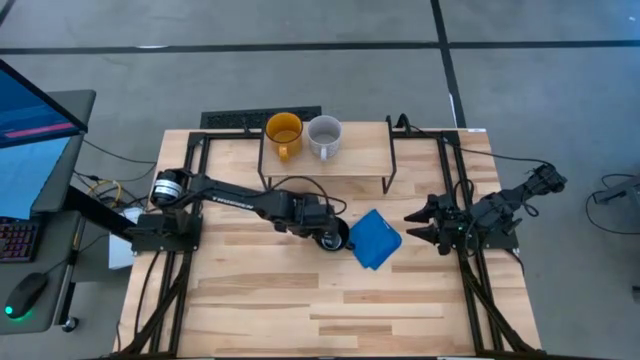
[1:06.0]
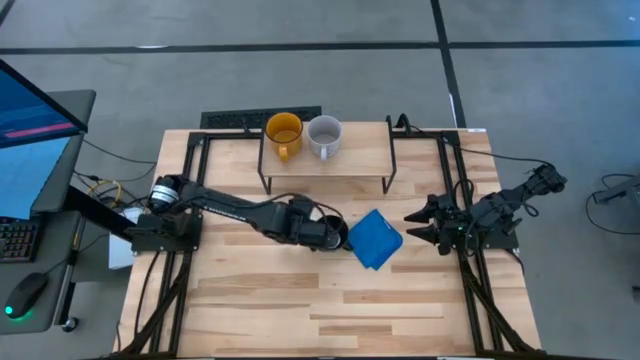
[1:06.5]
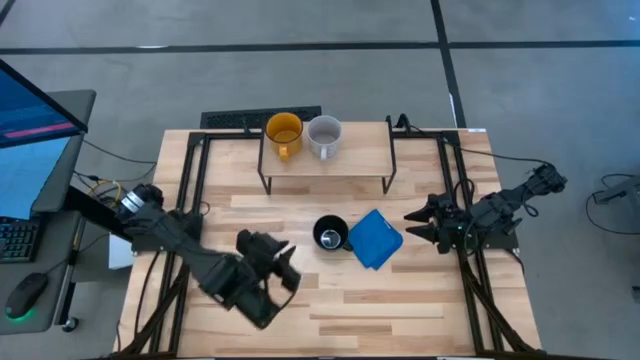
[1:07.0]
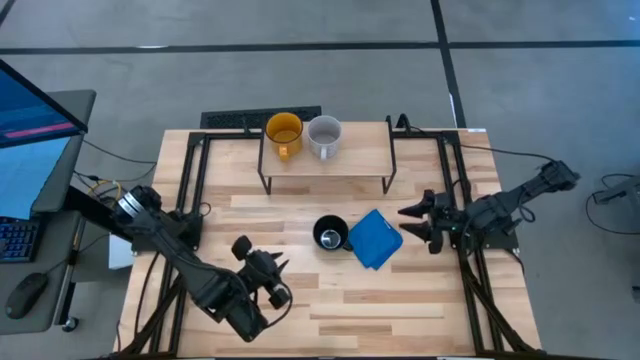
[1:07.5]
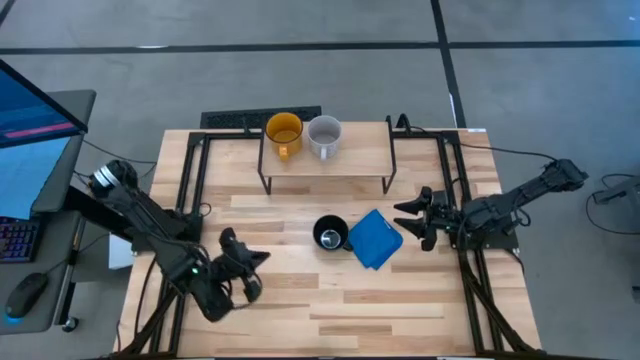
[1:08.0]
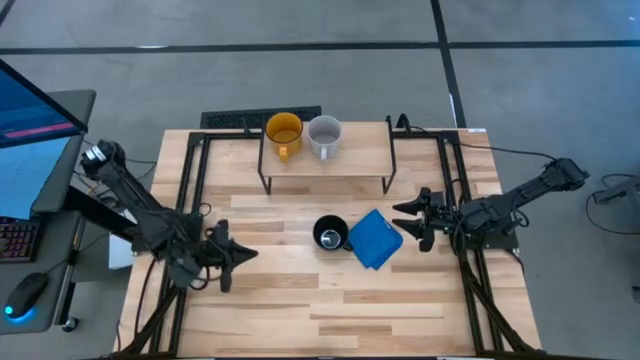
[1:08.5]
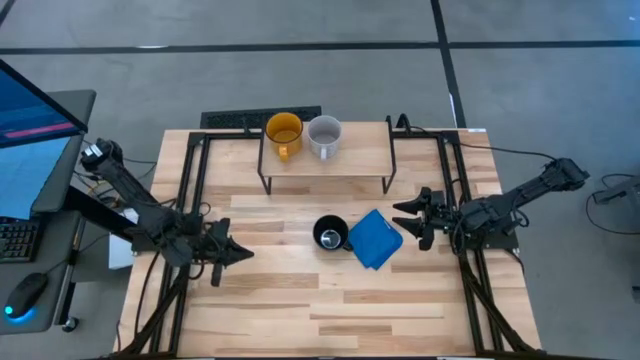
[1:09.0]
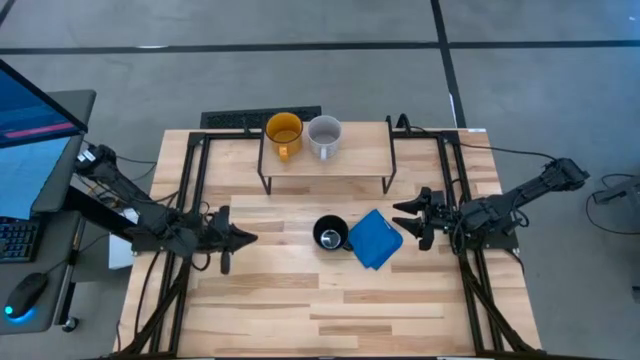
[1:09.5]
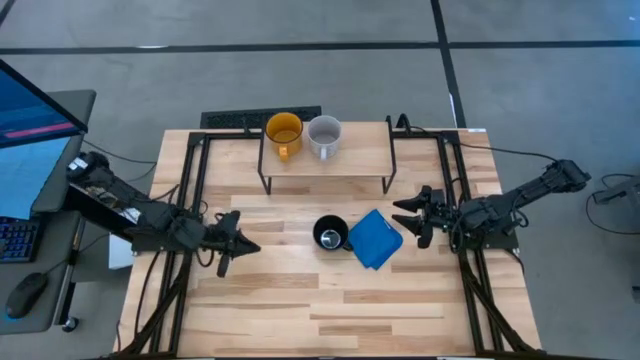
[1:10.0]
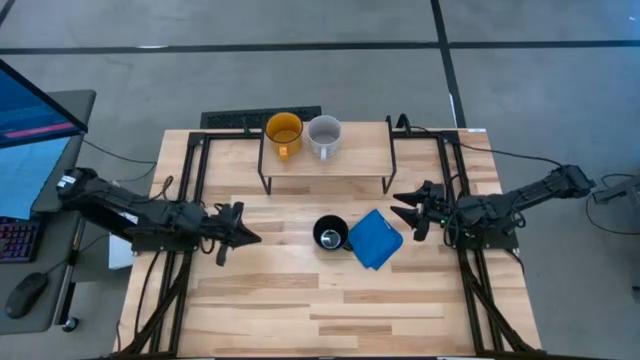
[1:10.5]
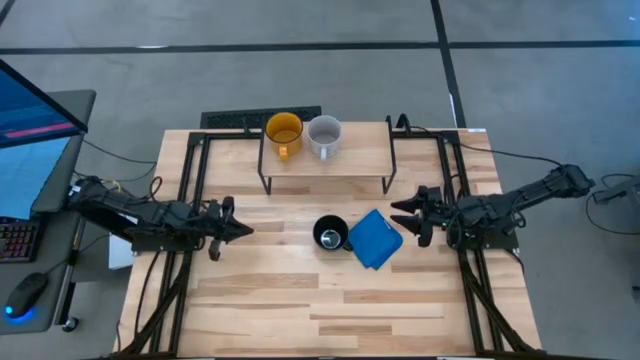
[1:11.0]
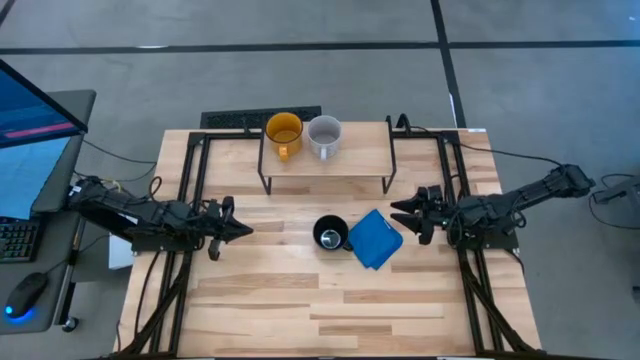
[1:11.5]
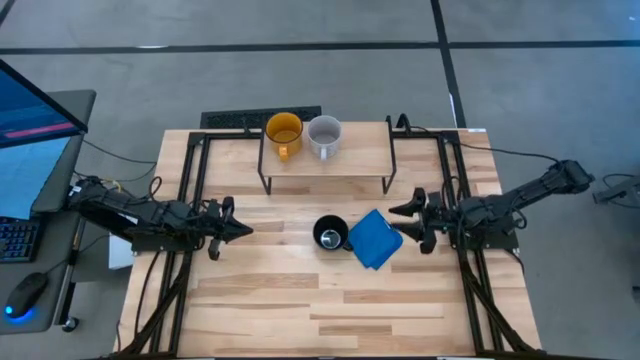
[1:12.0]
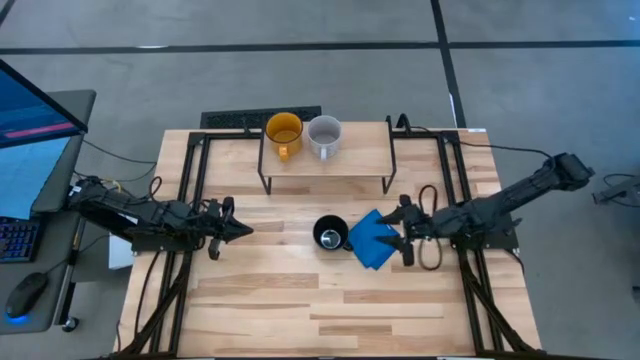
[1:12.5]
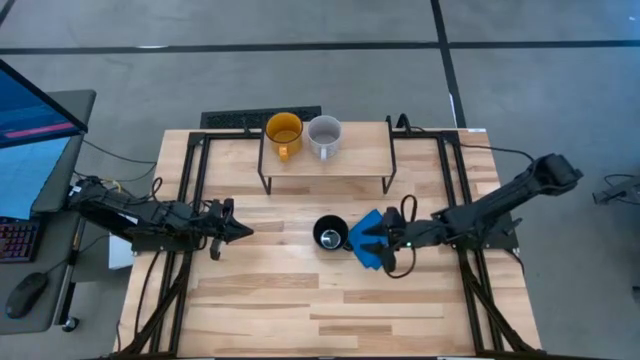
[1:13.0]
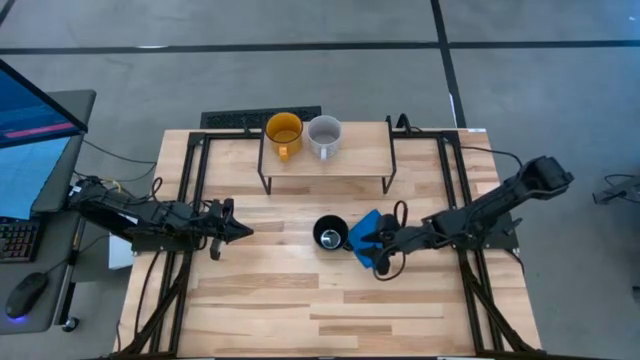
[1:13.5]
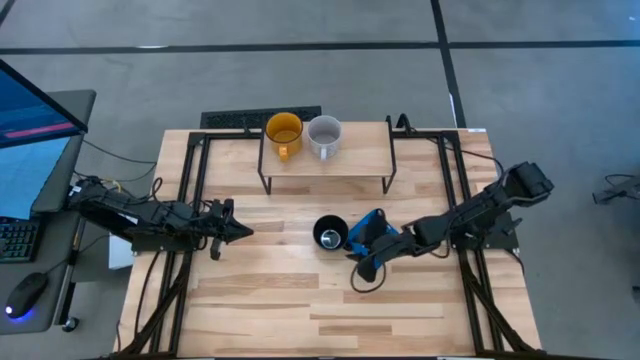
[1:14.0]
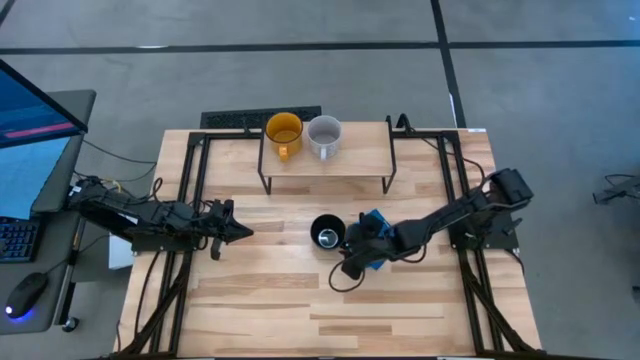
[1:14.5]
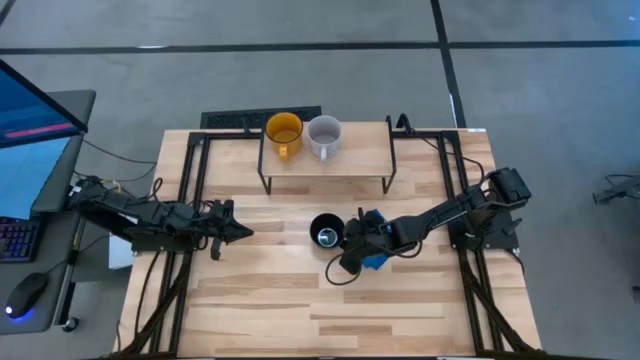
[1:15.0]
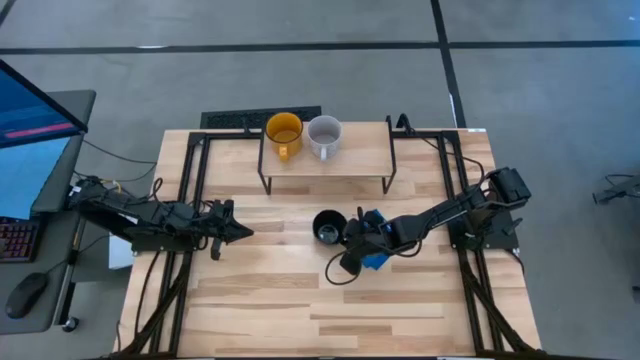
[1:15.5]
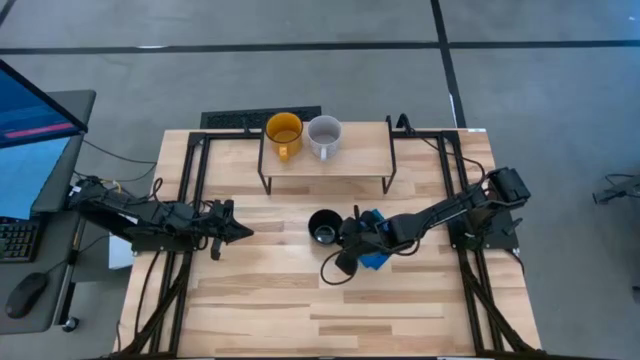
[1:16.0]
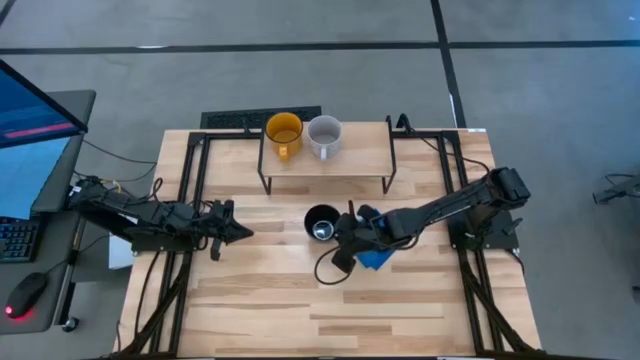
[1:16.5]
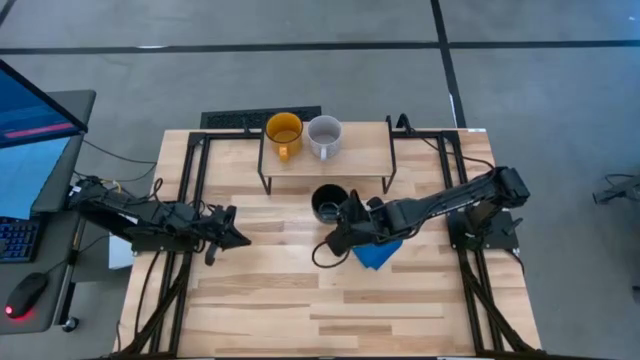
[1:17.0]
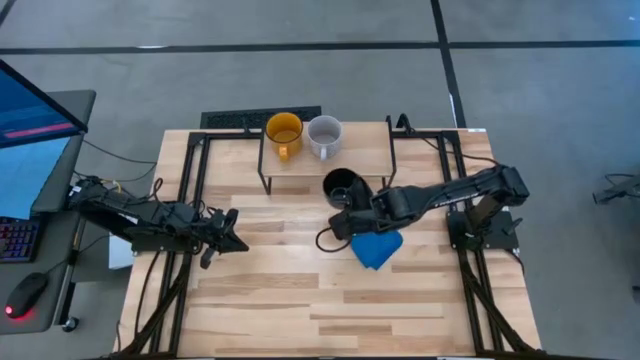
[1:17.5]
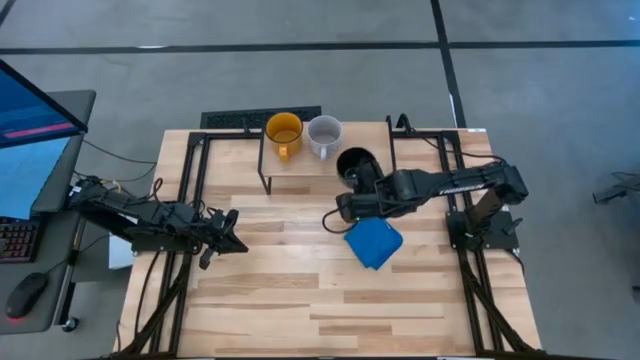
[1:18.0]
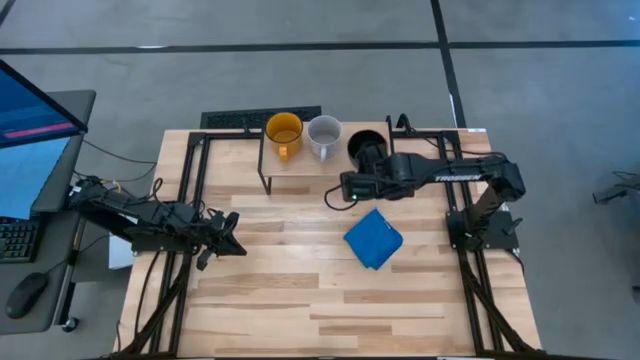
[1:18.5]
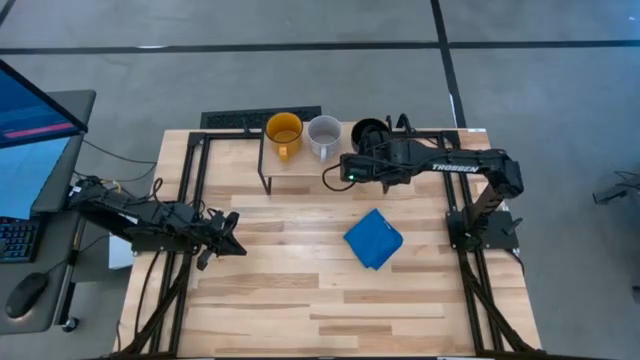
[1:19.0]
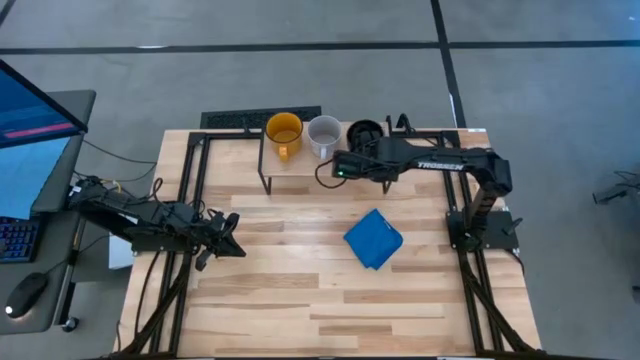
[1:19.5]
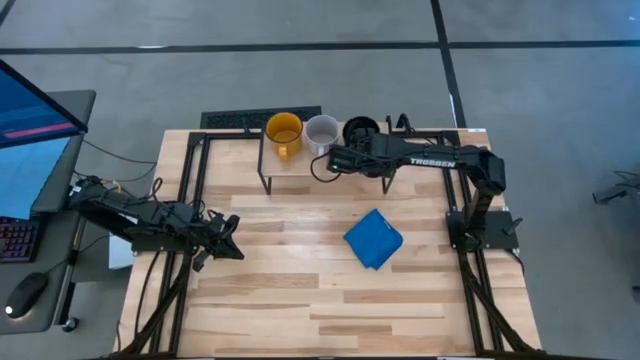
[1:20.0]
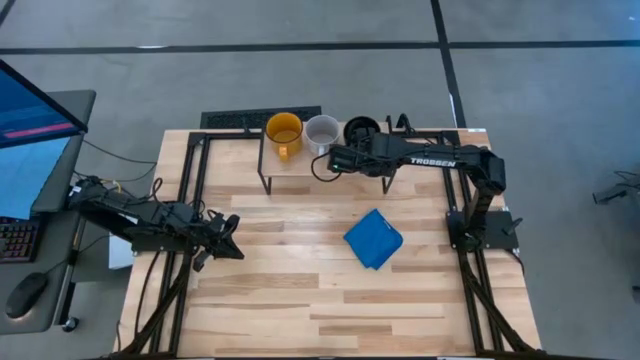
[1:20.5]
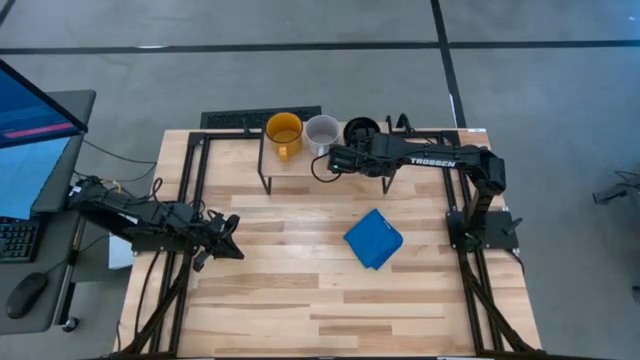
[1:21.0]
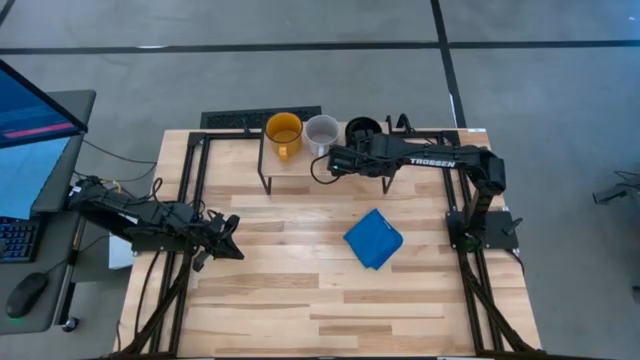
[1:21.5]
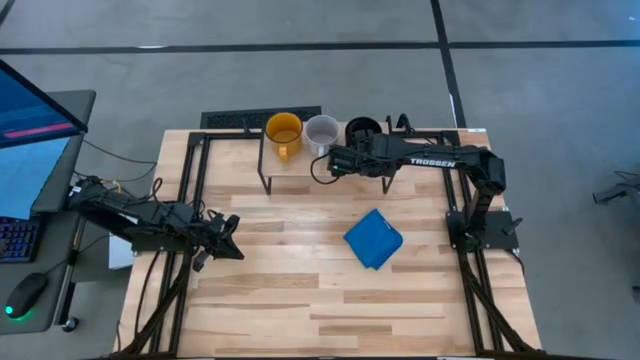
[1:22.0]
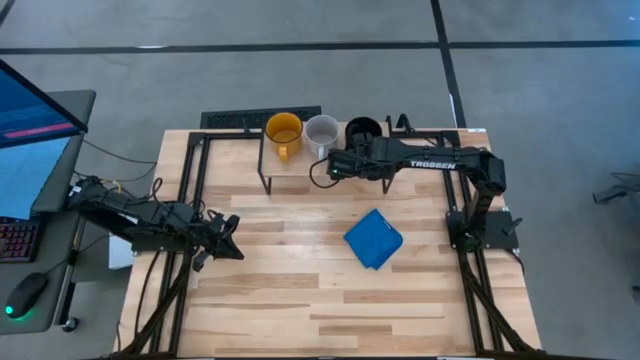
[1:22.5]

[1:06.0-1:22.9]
Task: Stack small to large cups/mugs on shelf
Put the black mug on the shelf

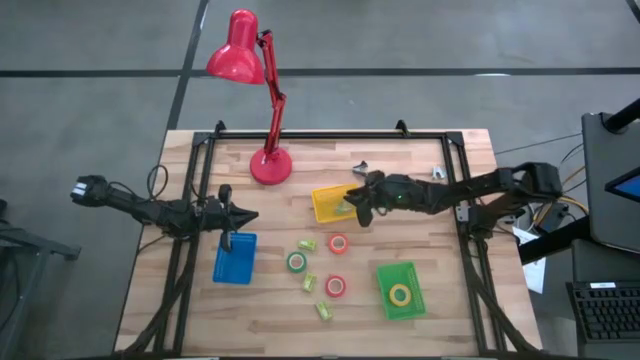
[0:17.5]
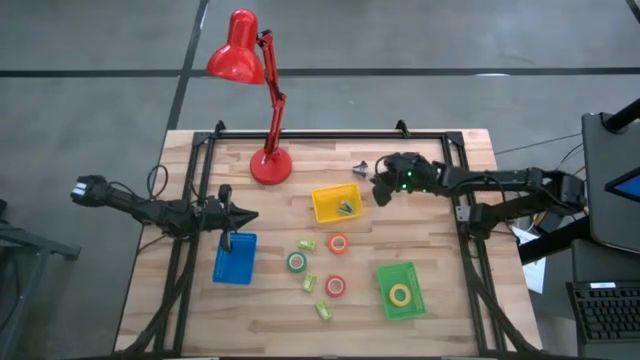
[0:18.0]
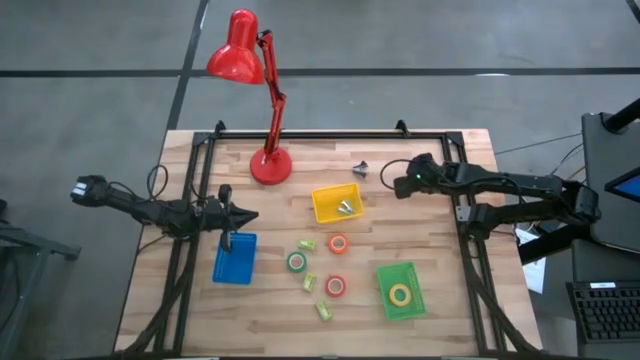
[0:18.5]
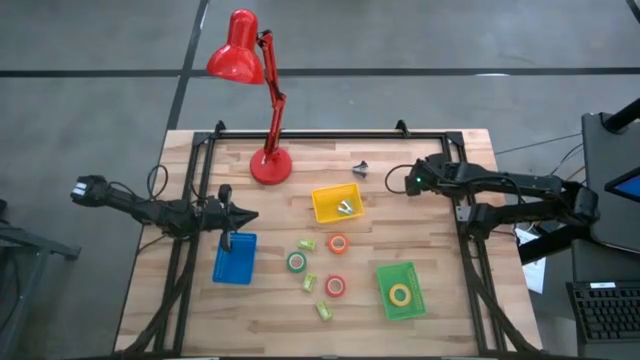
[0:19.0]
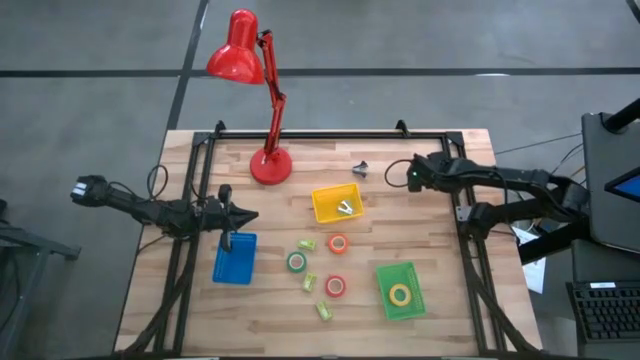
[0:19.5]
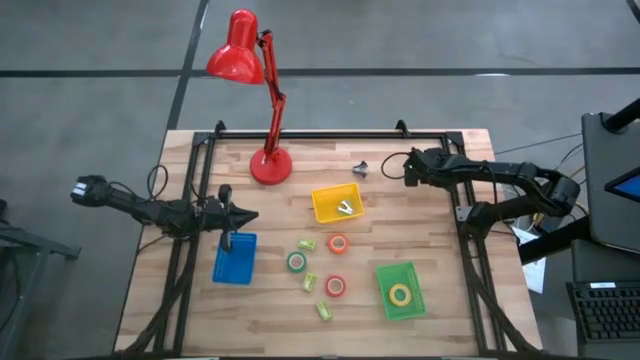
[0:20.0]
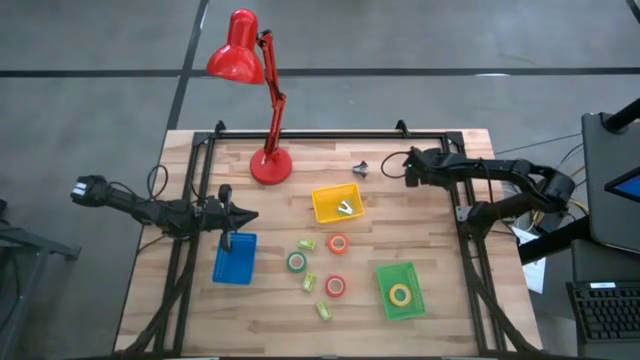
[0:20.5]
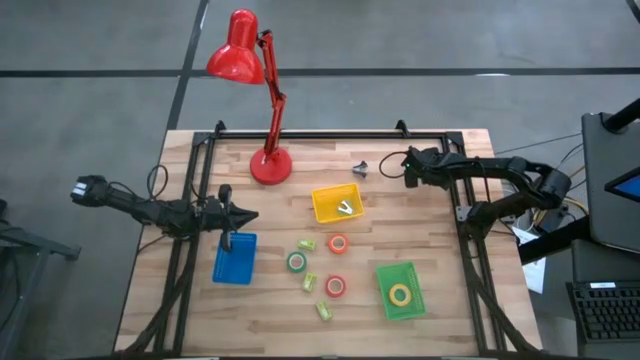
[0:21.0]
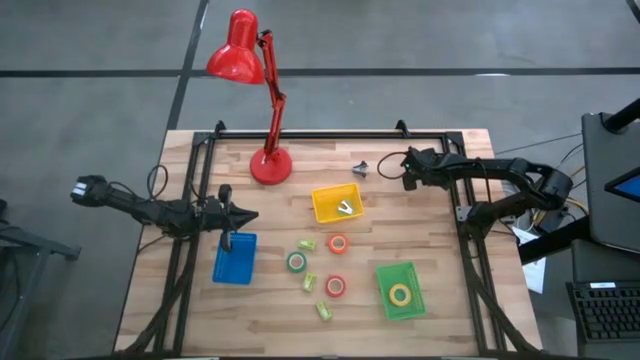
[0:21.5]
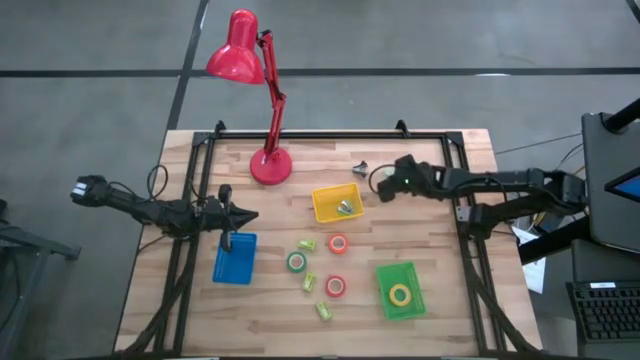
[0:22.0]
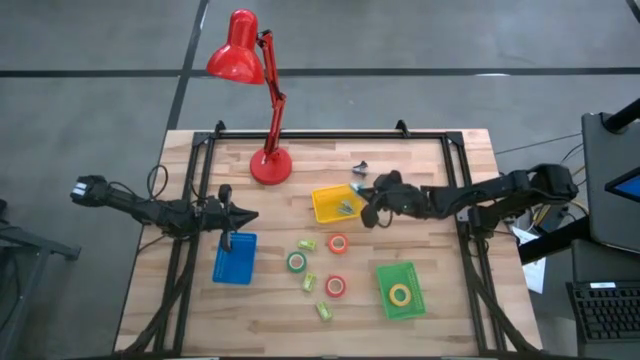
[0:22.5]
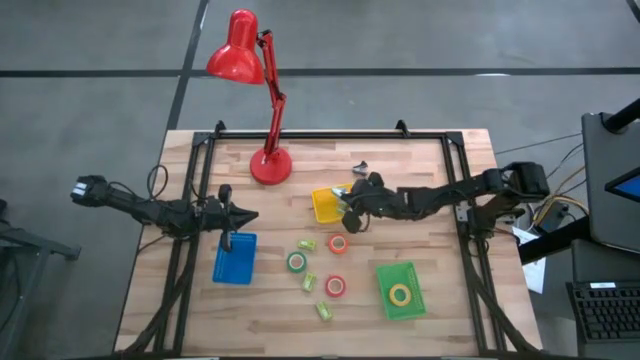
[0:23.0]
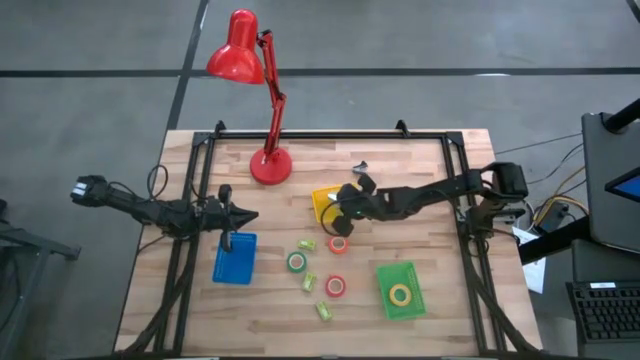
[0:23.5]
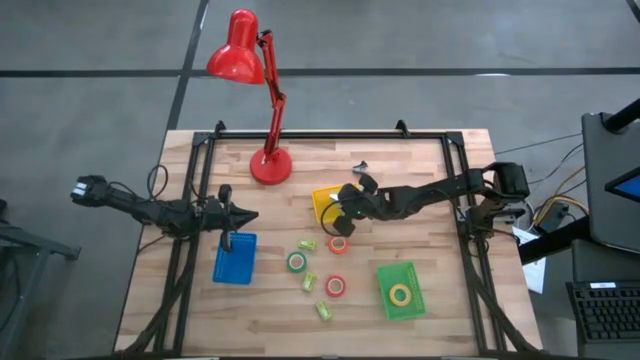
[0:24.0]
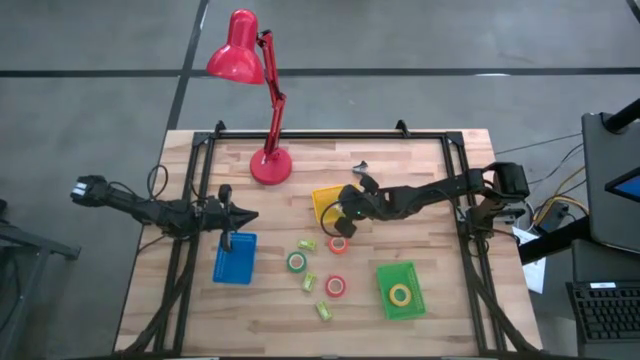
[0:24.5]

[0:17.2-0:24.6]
Task: Pick and place Stapler, Stapler remover, tape
Put the light blue staple remover into the yellow bin
